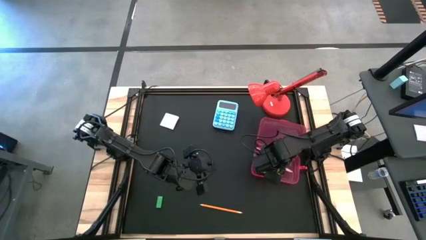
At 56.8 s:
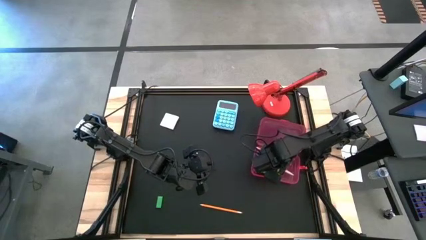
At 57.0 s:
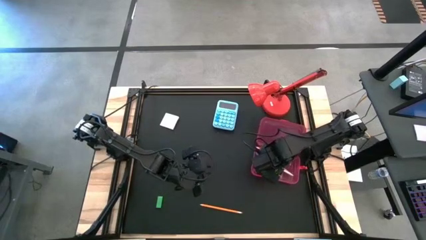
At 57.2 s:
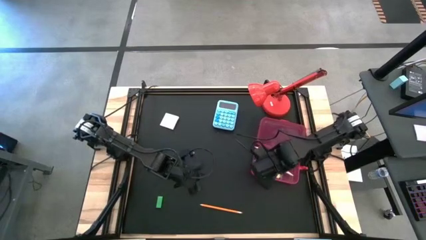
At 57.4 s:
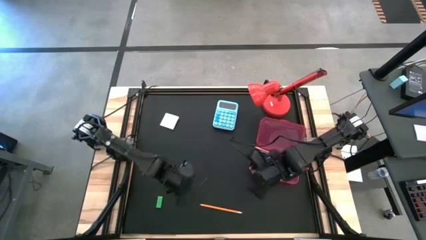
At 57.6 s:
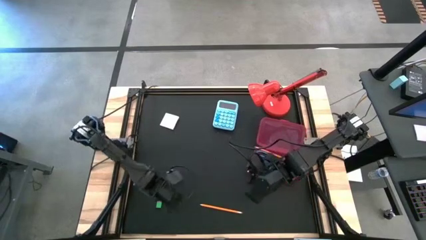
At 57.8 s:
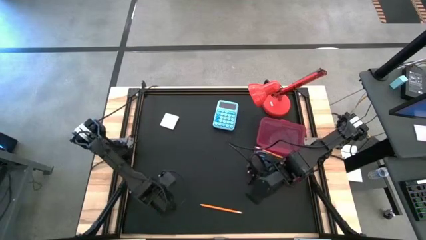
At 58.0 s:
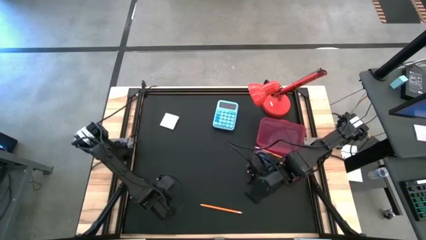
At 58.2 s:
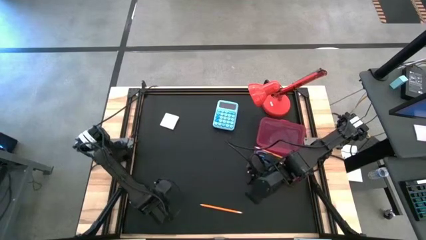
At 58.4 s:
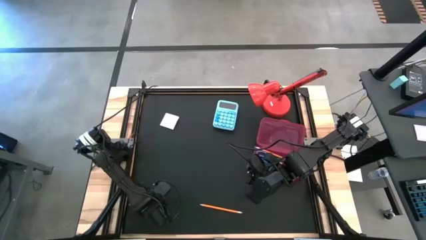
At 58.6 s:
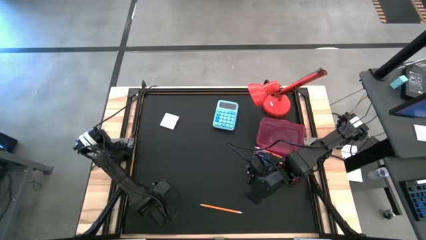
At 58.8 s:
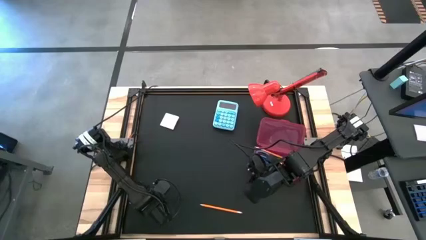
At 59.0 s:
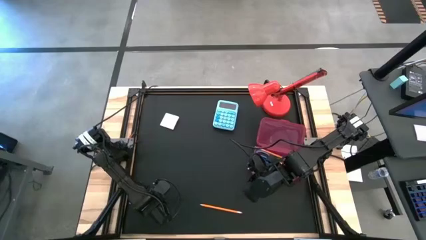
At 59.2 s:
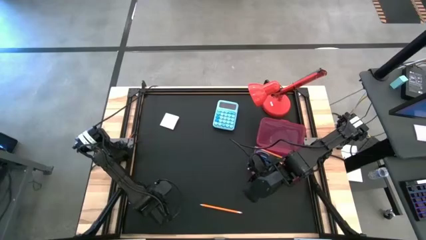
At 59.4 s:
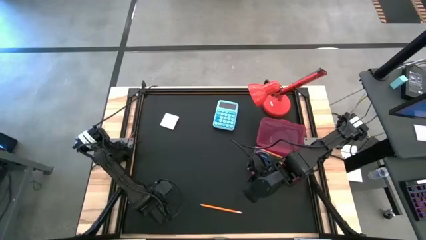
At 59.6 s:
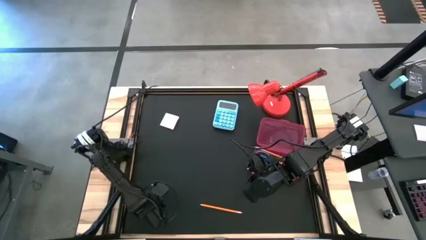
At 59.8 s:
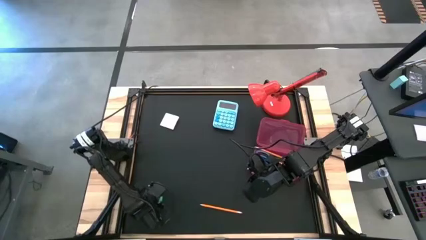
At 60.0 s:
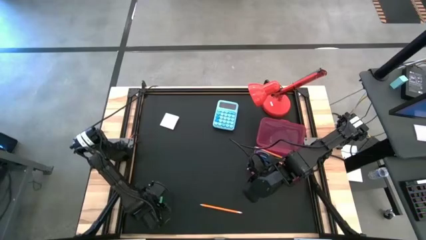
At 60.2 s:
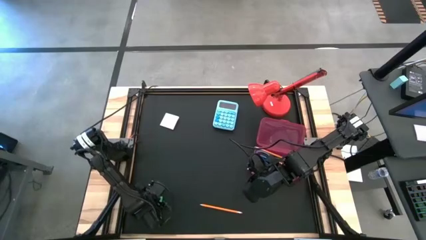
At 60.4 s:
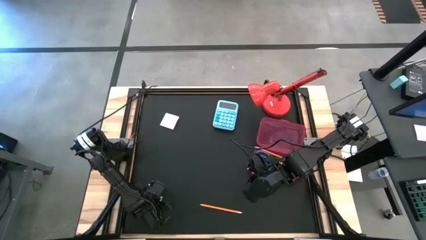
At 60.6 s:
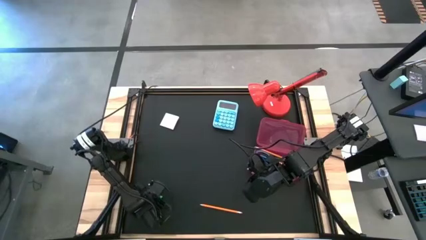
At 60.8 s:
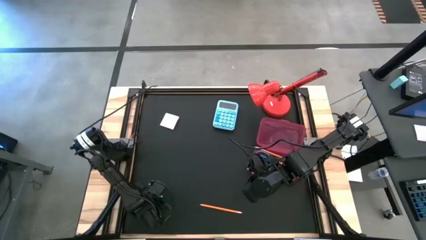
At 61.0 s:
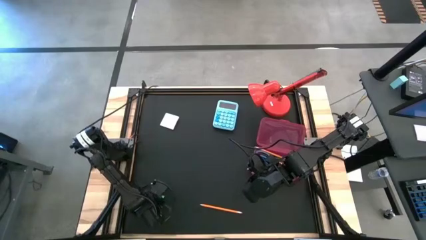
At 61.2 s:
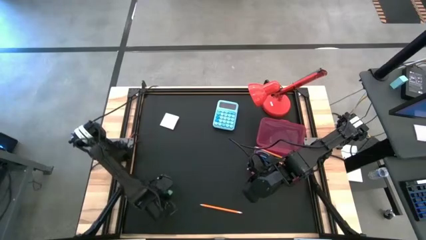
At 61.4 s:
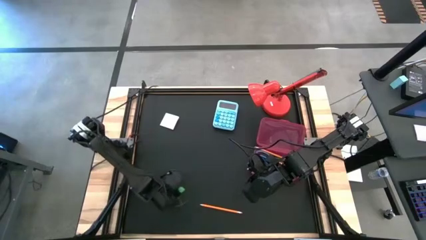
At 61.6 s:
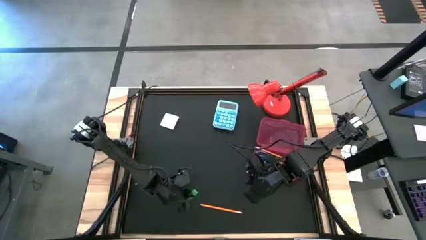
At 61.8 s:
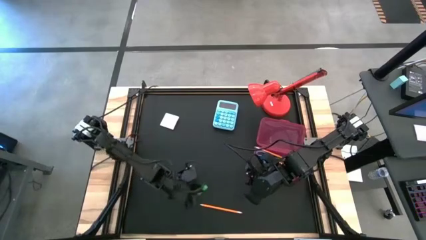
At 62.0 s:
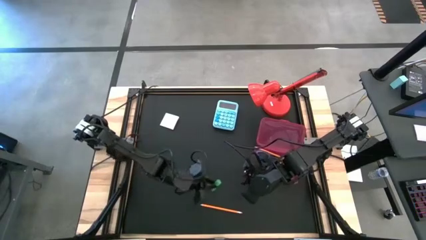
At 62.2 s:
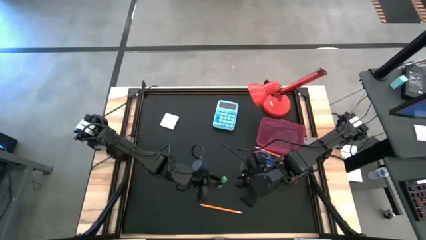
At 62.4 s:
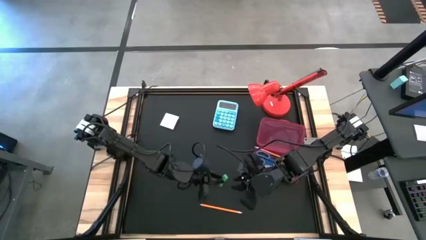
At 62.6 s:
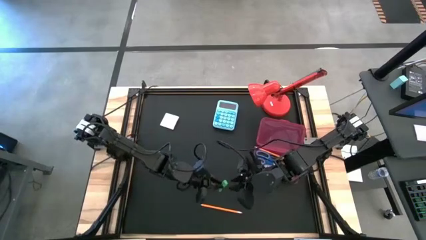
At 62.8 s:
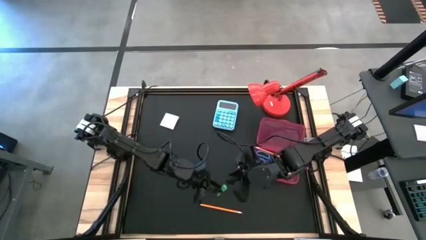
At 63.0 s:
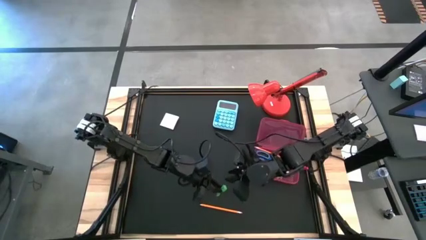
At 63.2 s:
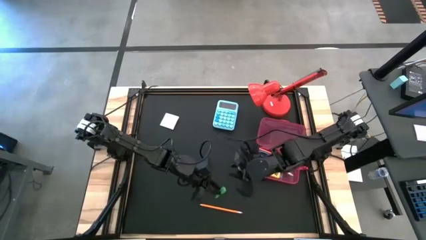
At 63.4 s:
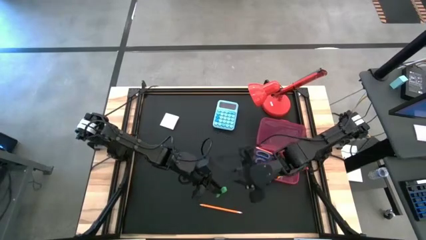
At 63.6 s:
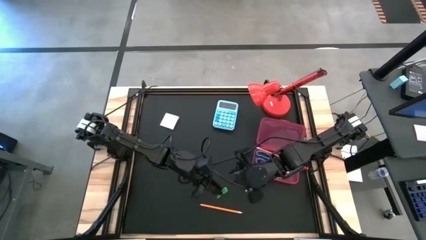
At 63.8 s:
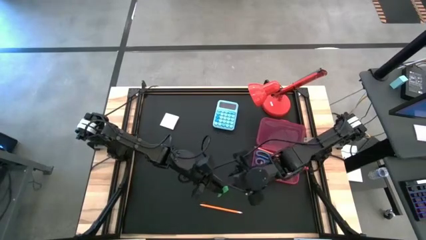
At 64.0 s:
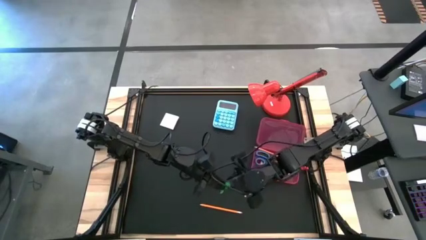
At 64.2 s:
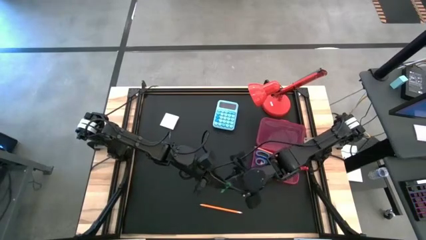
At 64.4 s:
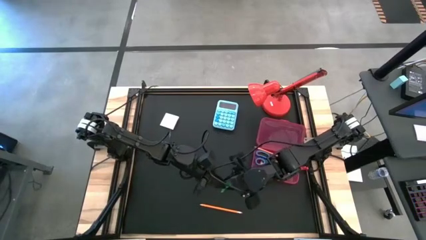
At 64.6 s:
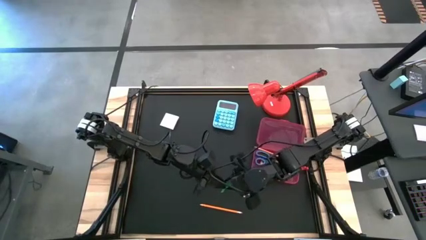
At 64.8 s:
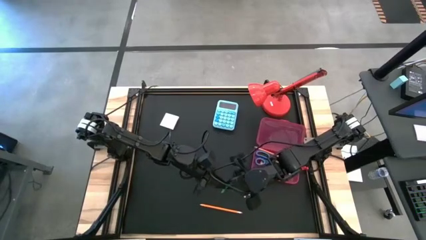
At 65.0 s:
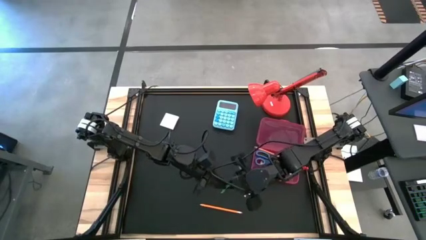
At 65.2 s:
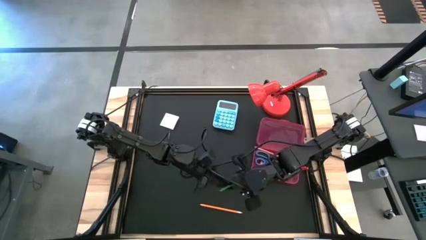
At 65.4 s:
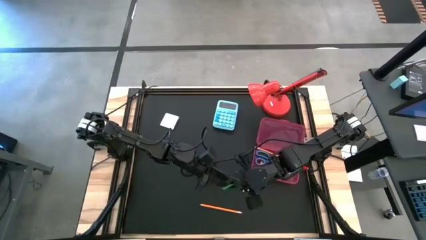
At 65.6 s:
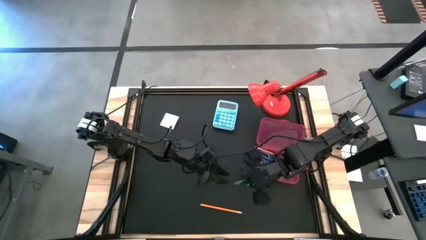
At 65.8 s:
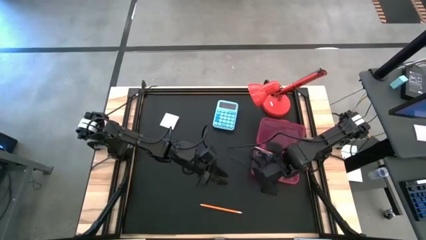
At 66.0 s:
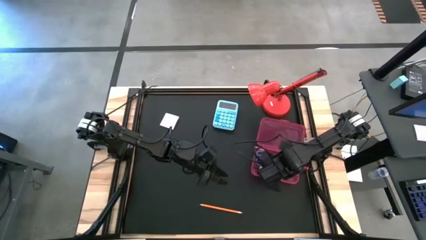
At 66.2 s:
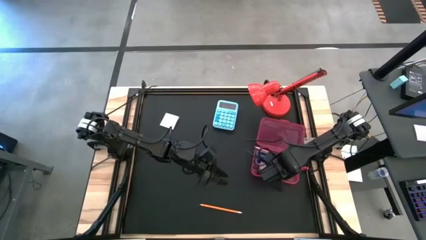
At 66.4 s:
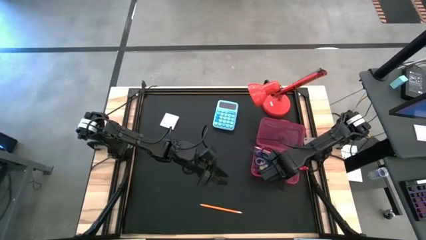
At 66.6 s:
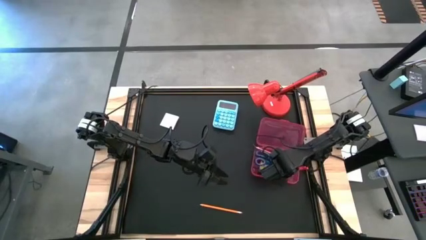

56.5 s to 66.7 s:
Task: Pack school essentials
Put the green eraser into the red supply box
